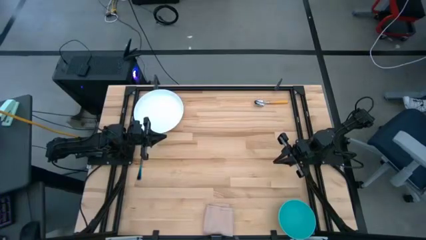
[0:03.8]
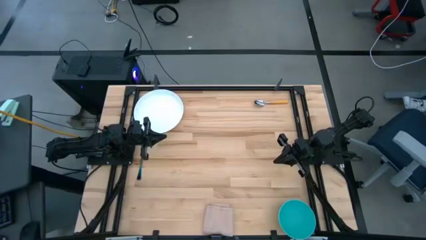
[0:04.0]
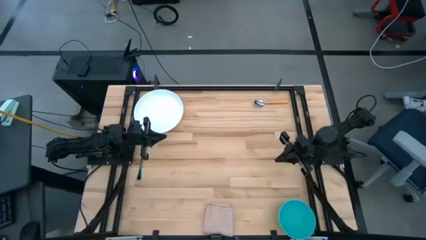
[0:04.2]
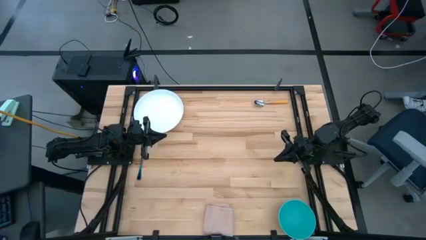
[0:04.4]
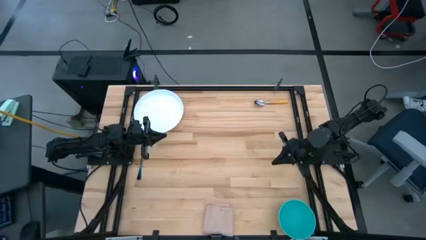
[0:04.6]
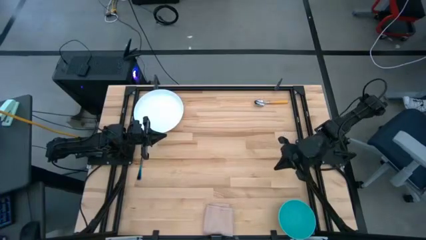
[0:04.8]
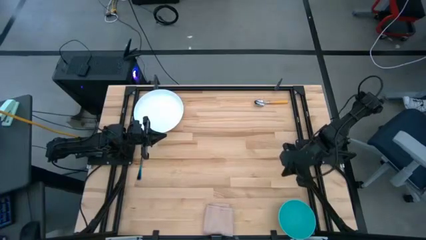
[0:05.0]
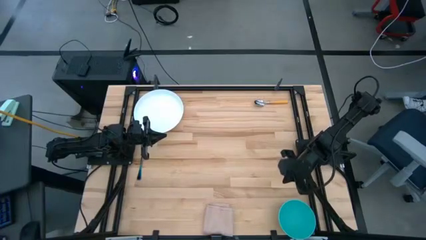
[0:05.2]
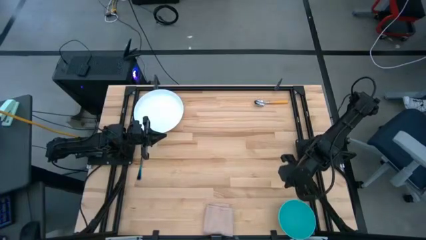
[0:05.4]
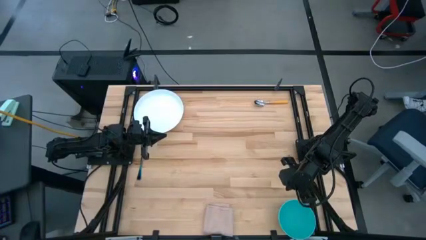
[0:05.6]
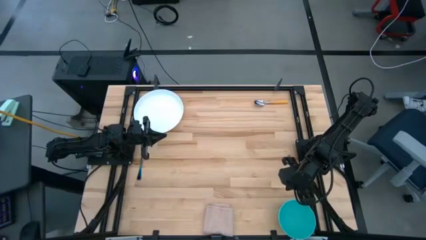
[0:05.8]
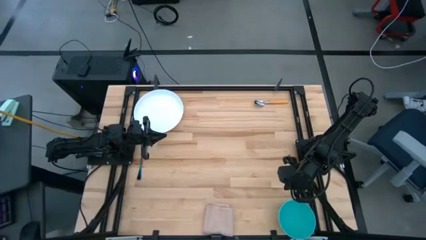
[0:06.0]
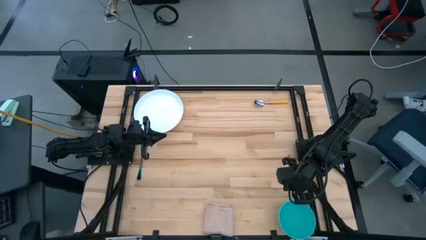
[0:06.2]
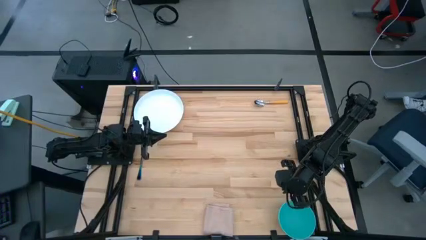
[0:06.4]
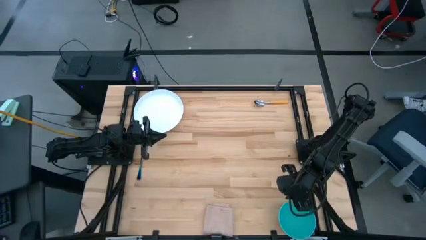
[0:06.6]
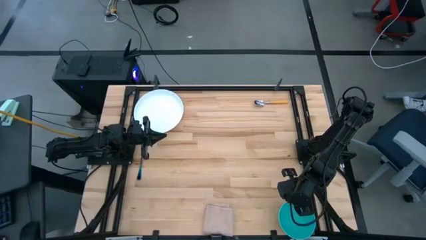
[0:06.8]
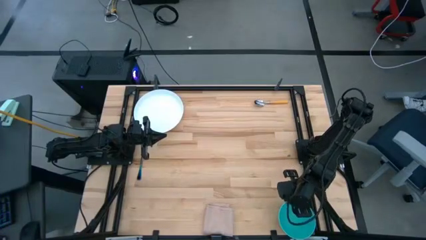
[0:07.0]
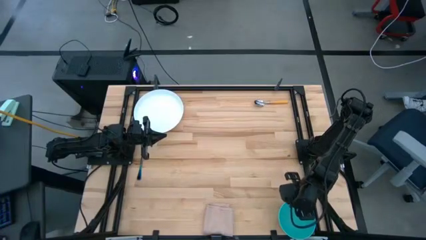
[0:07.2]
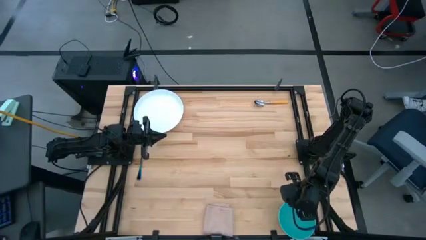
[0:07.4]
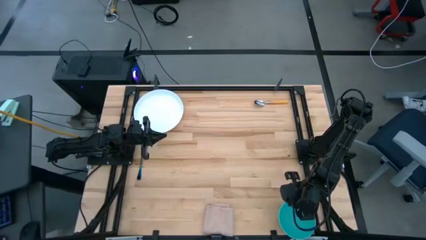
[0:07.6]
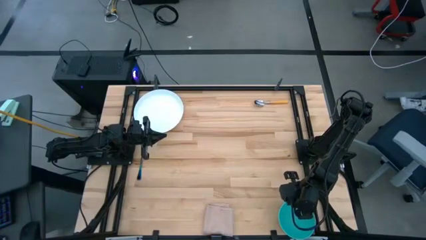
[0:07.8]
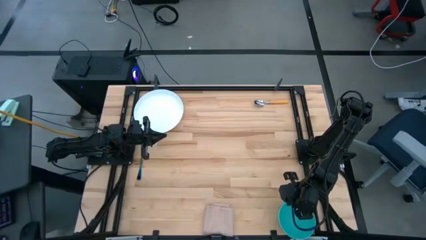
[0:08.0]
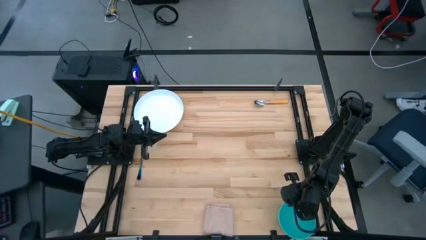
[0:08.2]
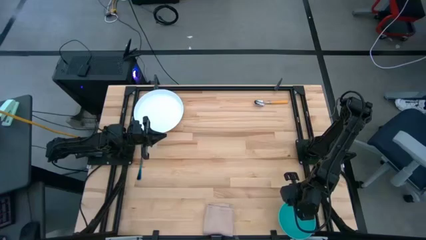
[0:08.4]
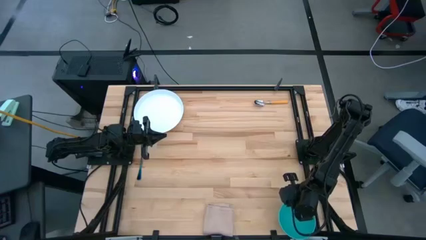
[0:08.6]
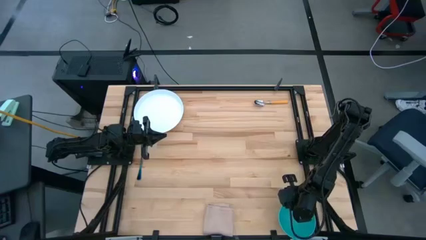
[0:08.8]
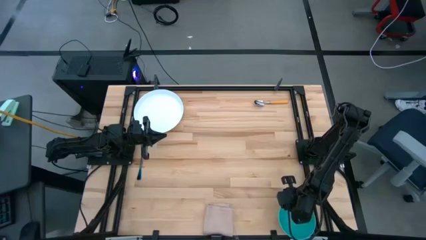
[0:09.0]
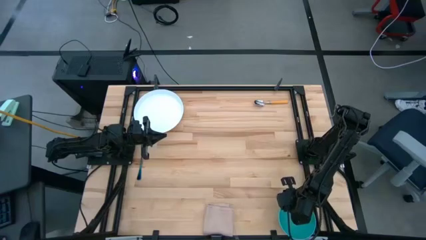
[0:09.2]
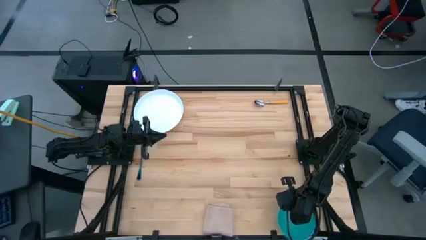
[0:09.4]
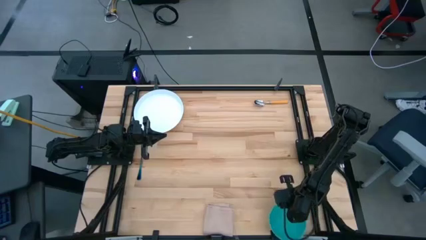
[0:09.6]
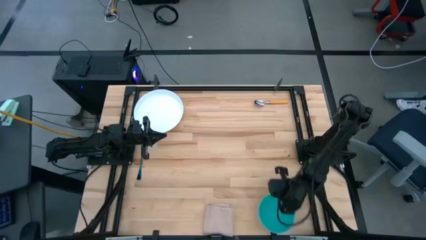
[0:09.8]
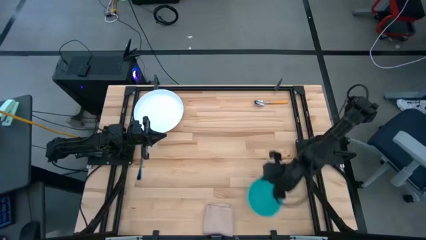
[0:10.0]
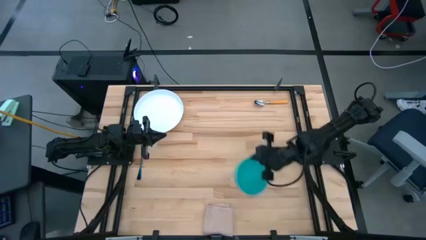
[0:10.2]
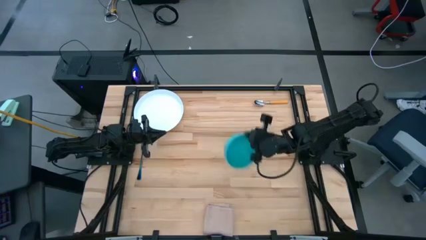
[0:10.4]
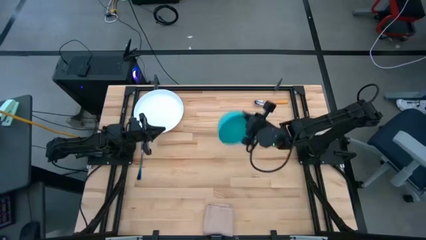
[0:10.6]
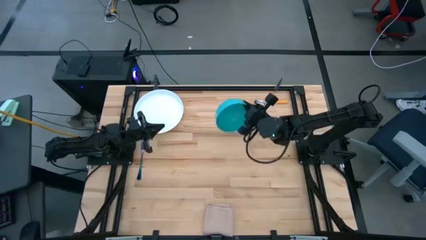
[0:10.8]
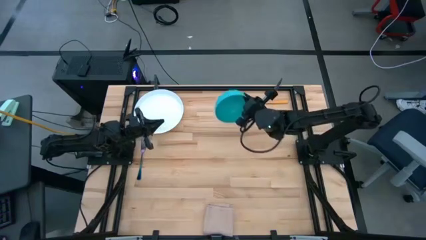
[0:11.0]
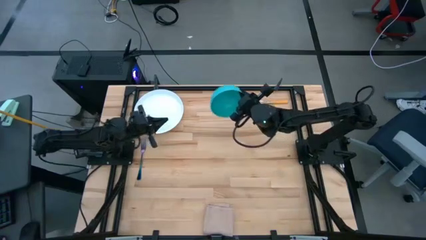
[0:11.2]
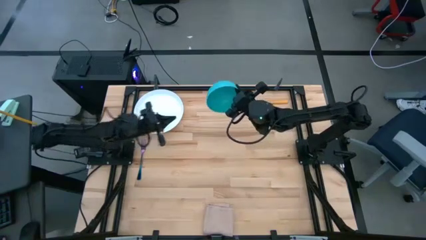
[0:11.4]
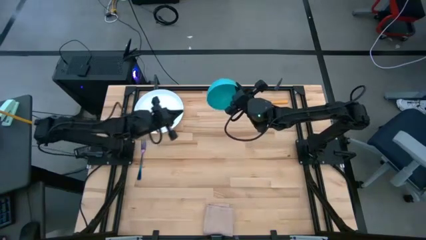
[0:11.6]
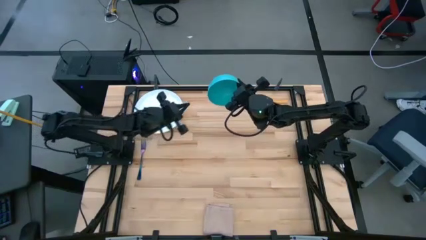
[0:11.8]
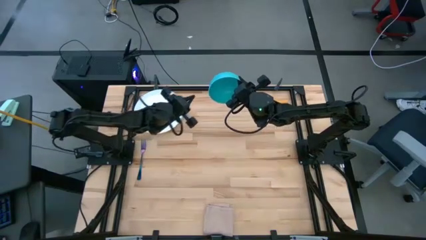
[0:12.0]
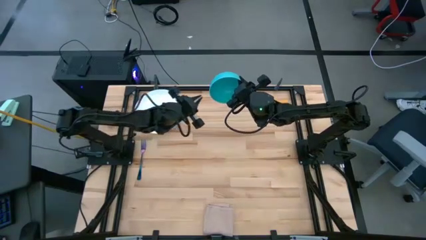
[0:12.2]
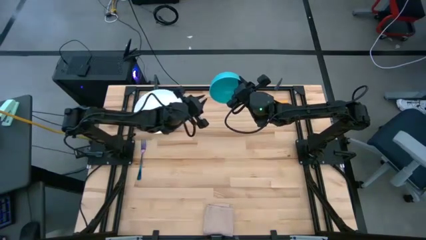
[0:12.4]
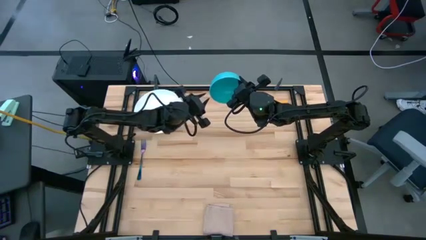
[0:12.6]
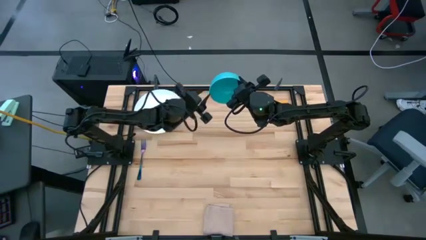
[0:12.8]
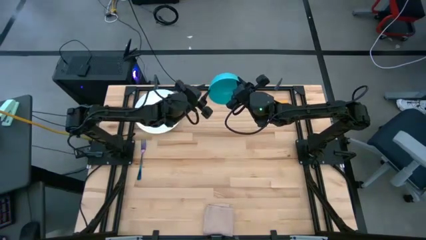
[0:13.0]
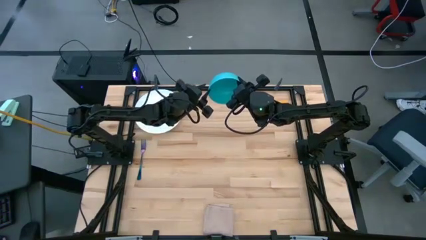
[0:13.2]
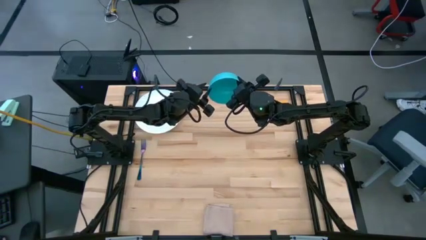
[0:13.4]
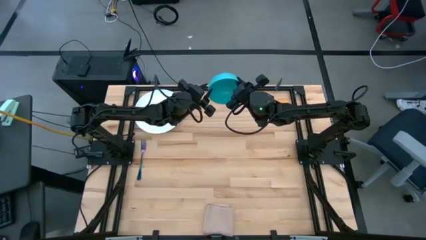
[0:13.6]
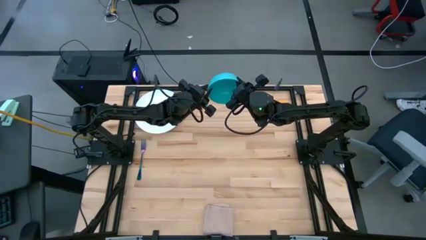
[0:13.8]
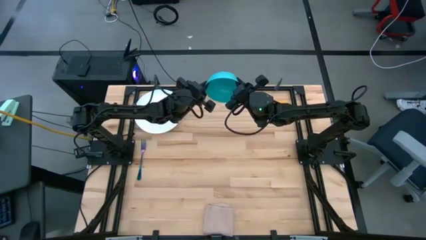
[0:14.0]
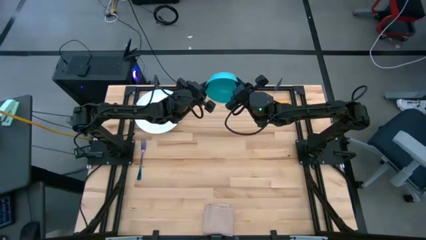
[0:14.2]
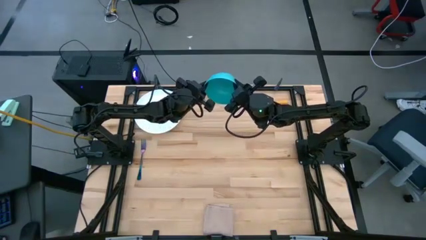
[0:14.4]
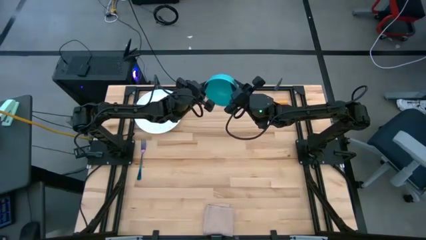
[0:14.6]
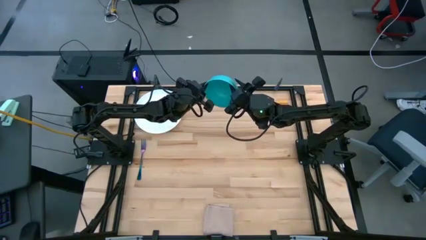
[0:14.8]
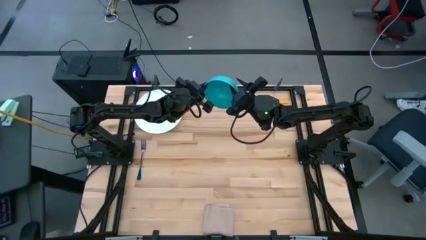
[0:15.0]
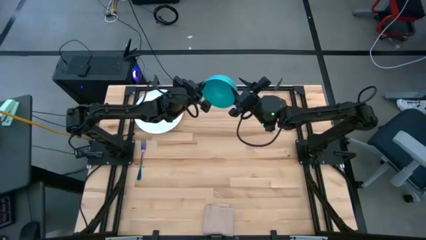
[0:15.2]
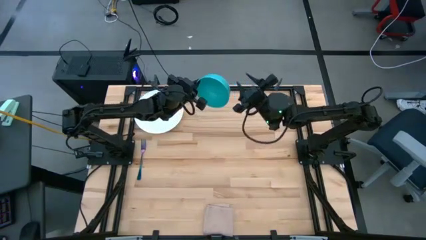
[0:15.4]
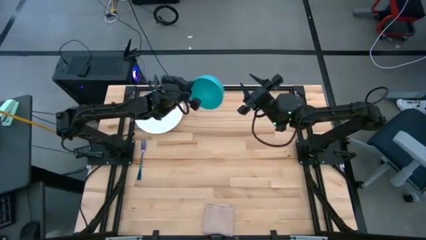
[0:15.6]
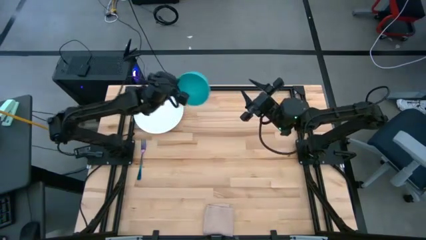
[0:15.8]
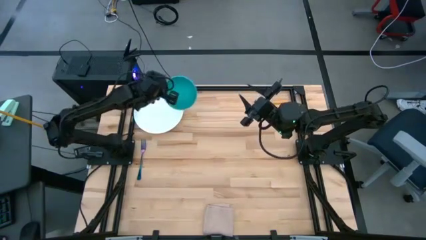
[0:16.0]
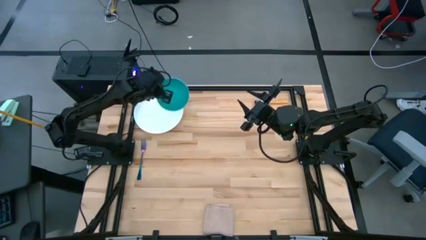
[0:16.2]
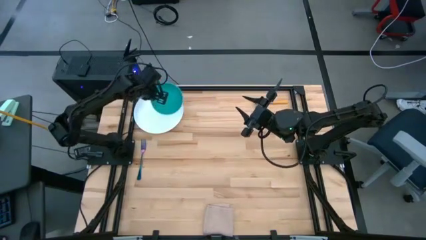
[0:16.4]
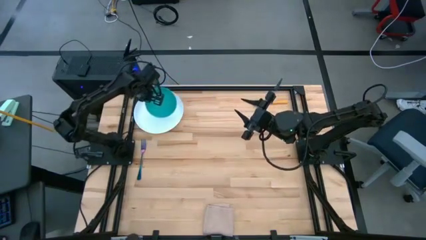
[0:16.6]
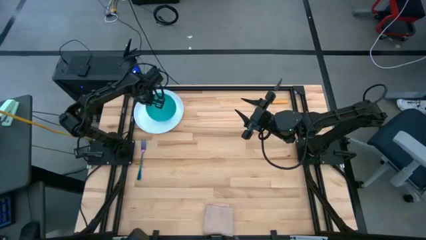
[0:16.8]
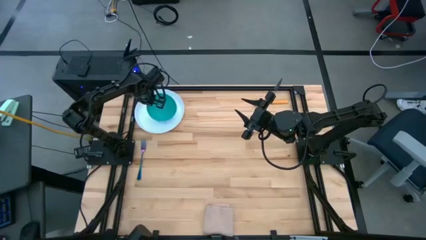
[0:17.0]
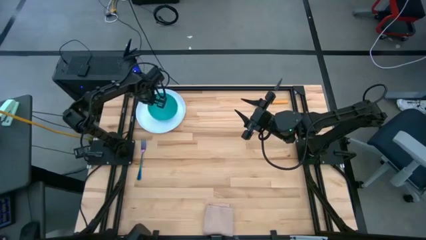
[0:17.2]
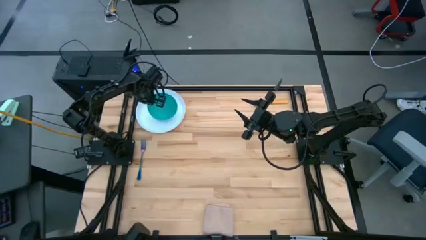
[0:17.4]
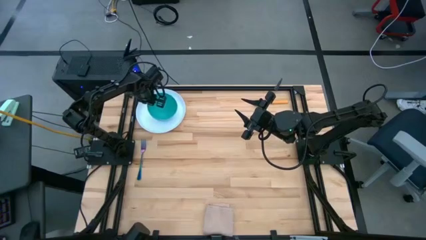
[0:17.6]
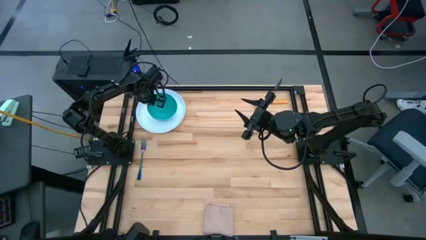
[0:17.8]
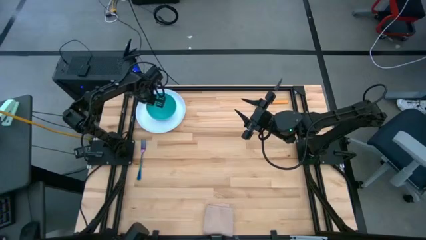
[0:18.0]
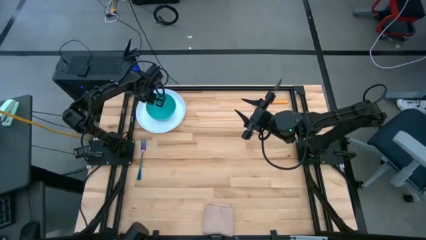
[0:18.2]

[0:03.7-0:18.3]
Task: Set table place
Put the blue bowl on the white plate
